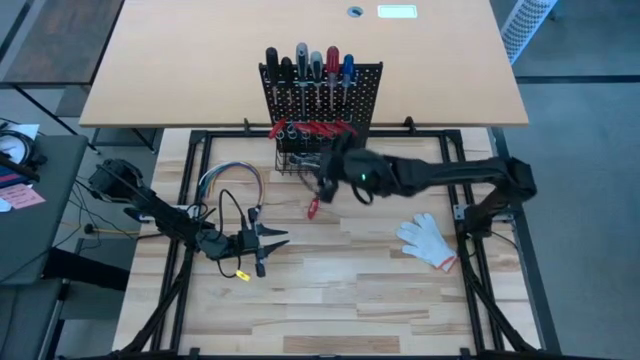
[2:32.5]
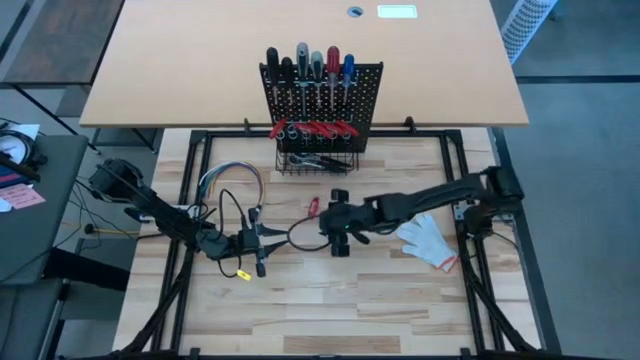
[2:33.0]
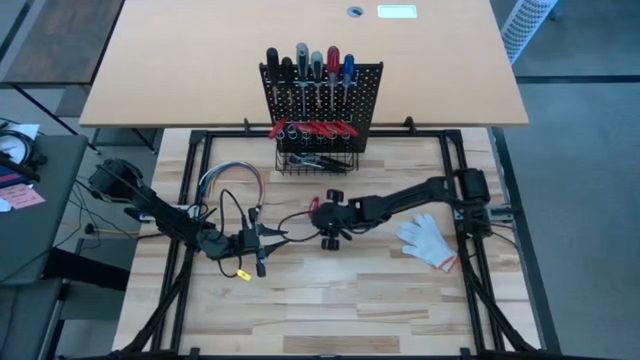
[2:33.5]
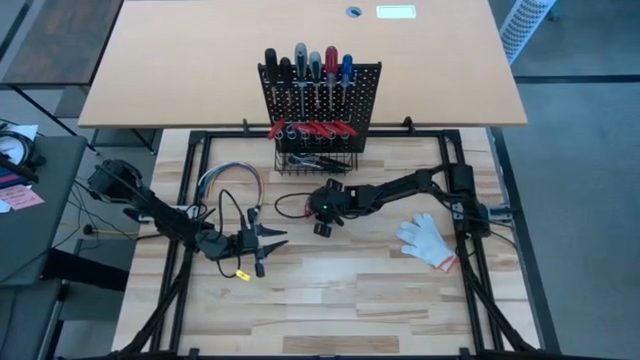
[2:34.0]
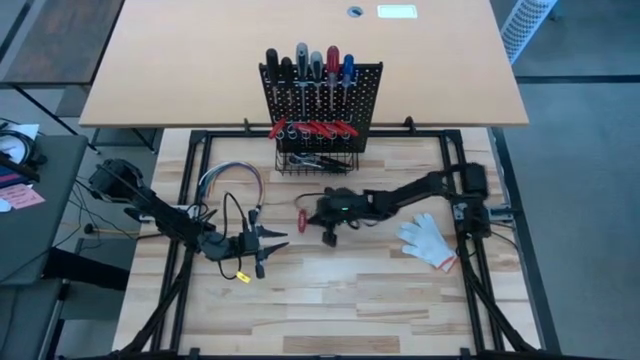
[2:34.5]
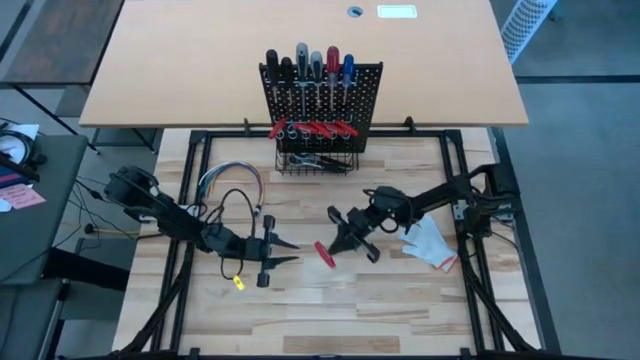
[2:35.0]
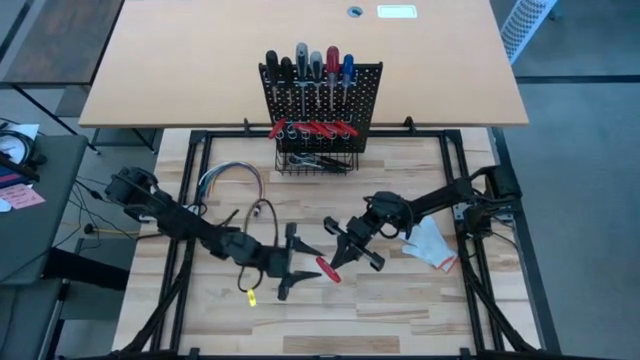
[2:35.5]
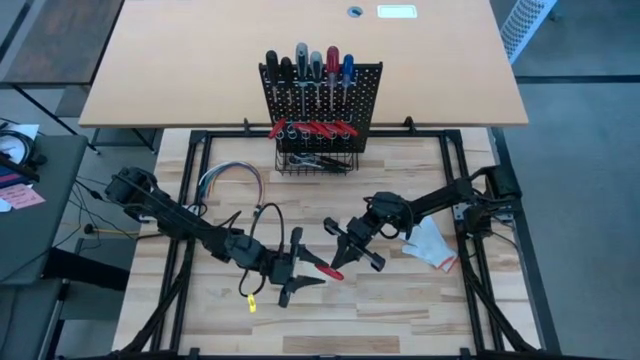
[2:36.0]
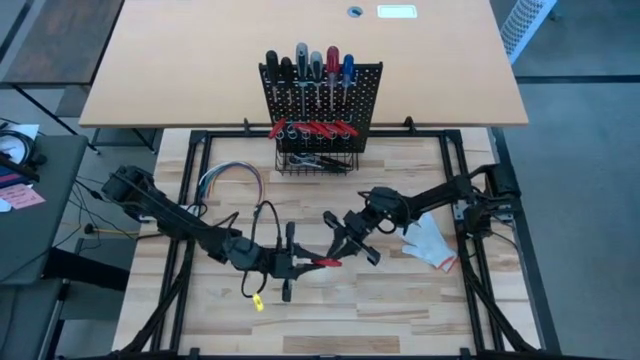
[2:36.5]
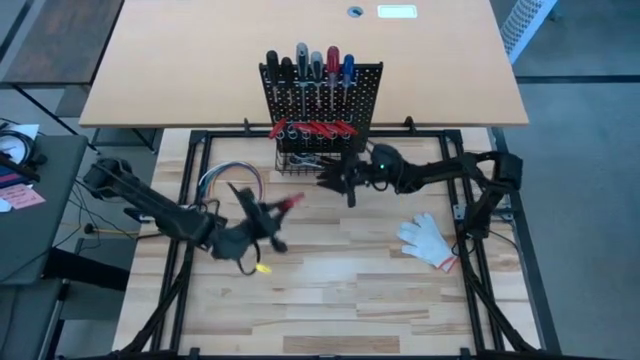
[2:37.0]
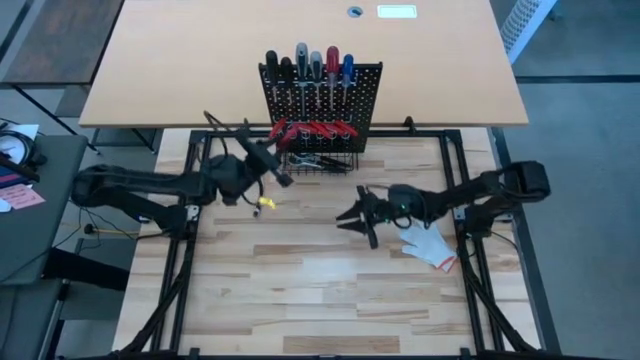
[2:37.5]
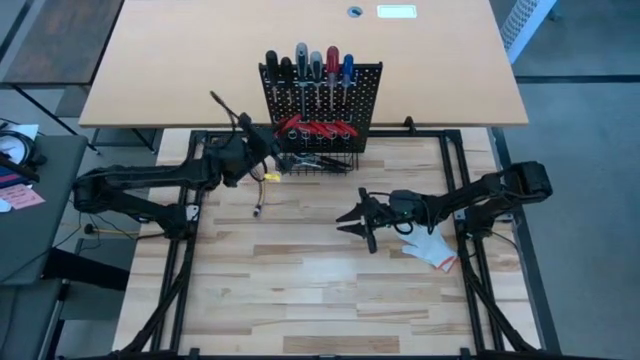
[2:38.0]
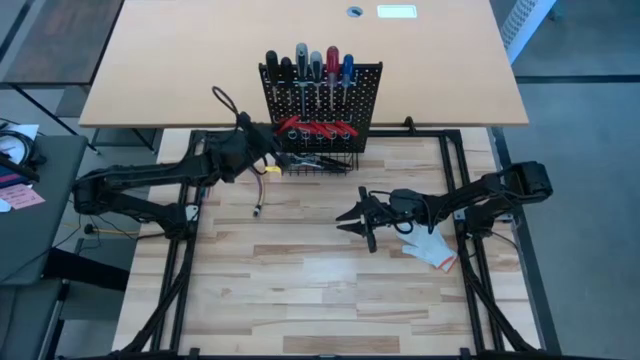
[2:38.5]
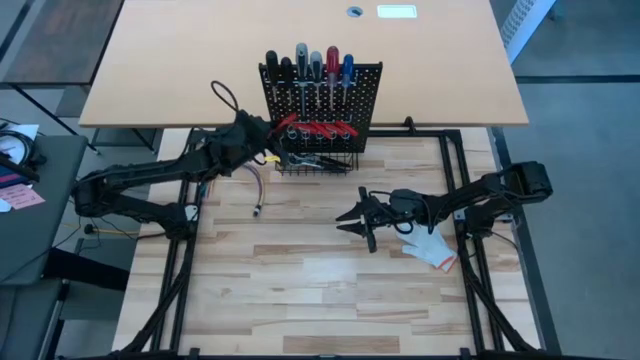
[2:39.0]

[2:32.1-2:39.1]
Task: Hang tools onto peg board
Hang the red allen wrench on the pegboard

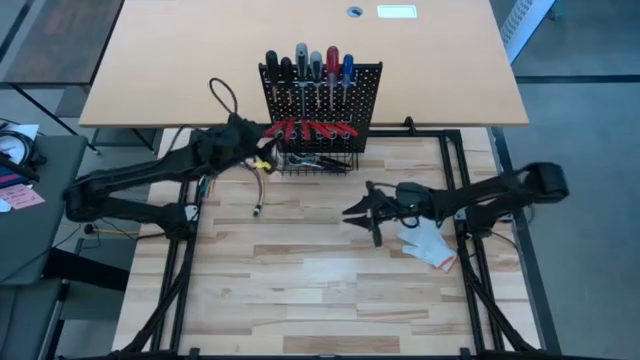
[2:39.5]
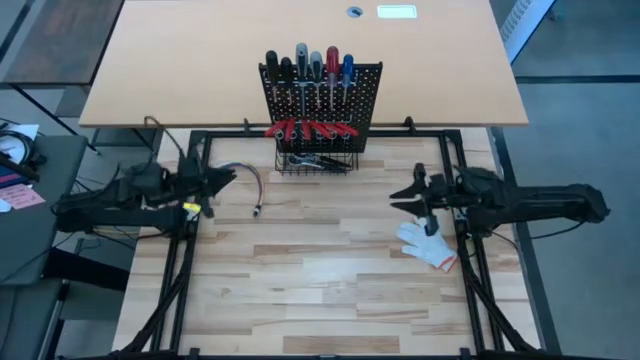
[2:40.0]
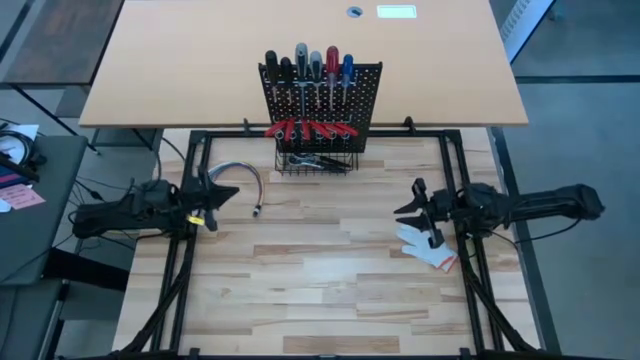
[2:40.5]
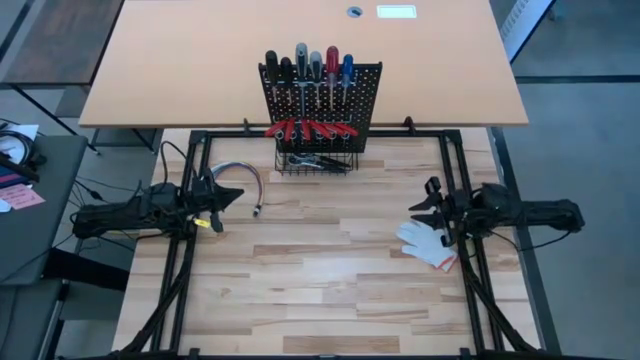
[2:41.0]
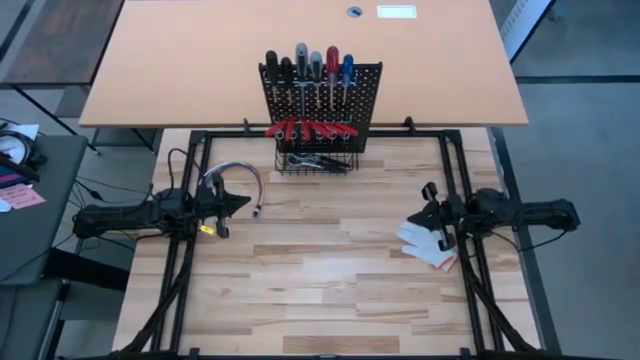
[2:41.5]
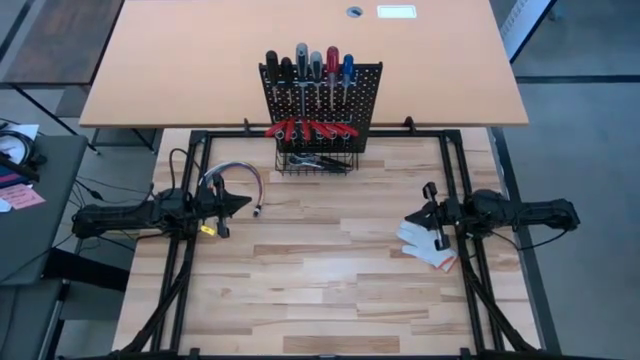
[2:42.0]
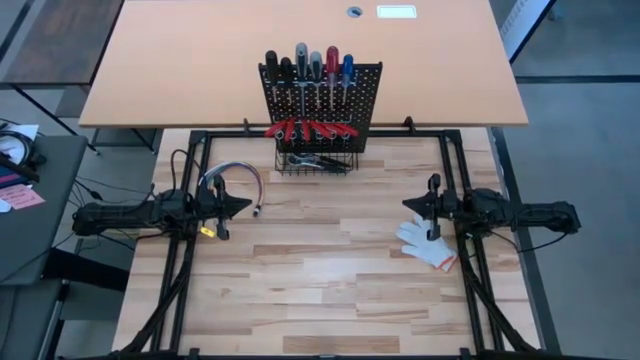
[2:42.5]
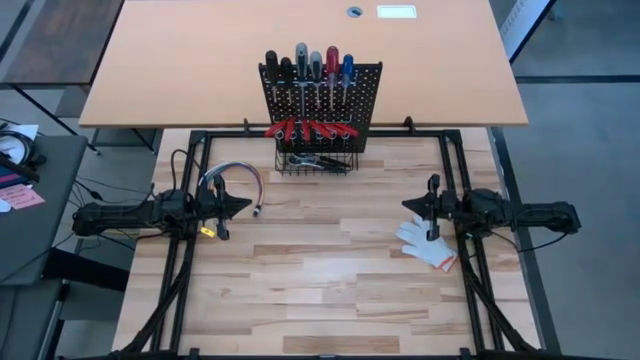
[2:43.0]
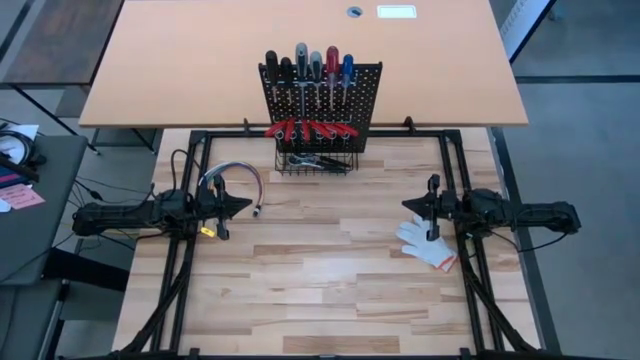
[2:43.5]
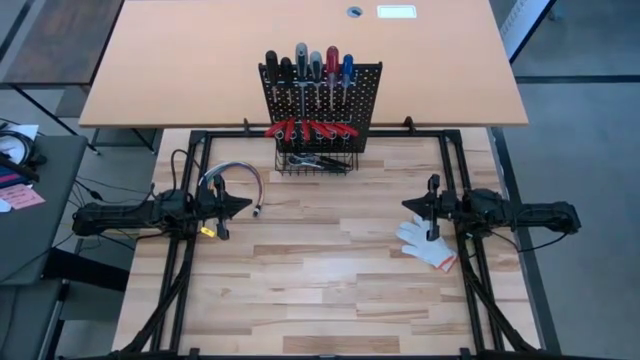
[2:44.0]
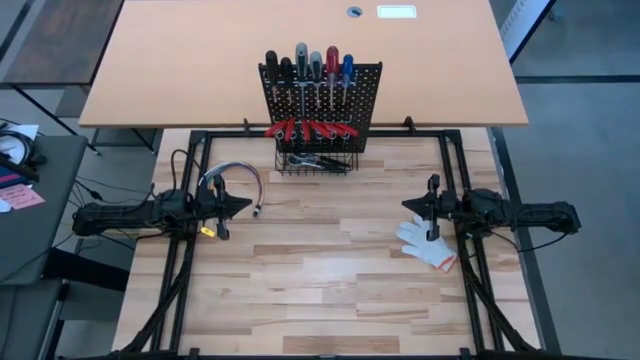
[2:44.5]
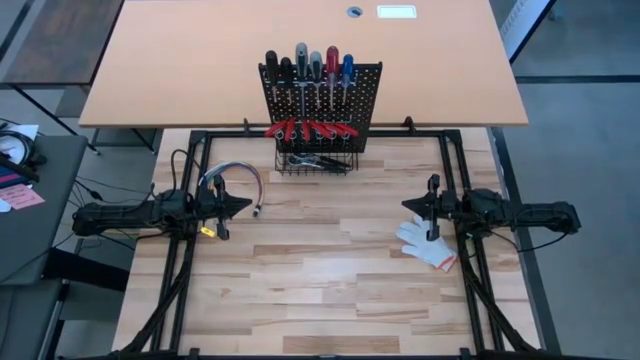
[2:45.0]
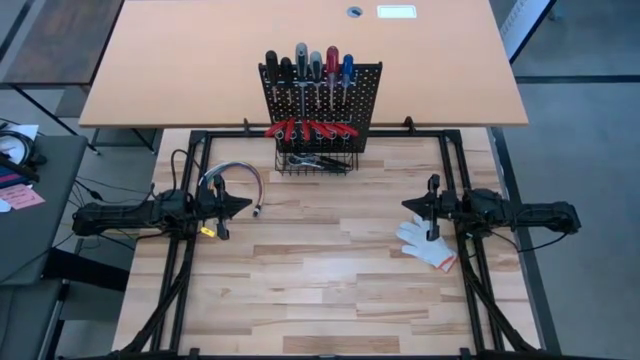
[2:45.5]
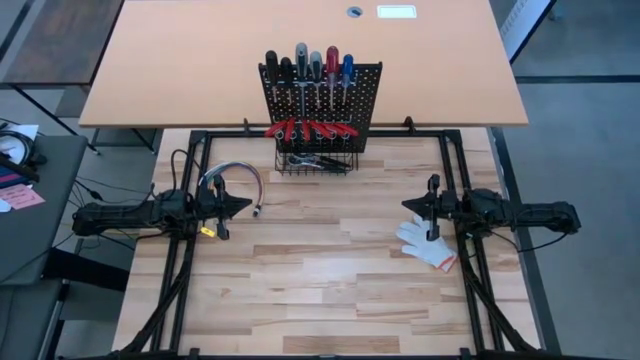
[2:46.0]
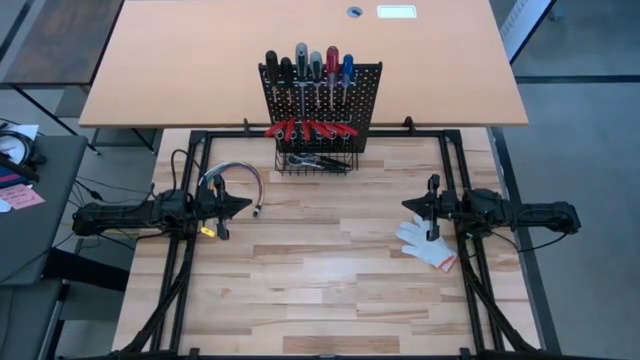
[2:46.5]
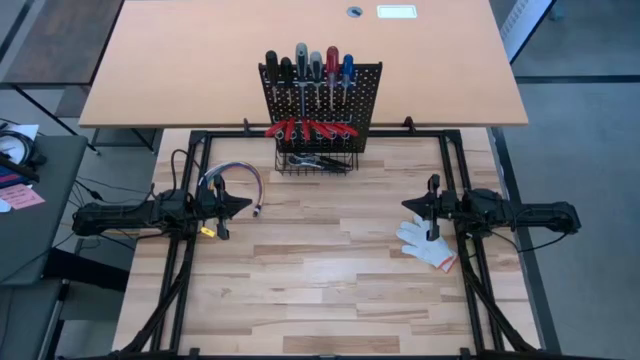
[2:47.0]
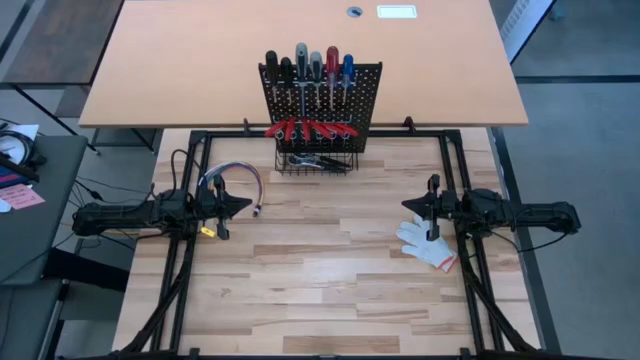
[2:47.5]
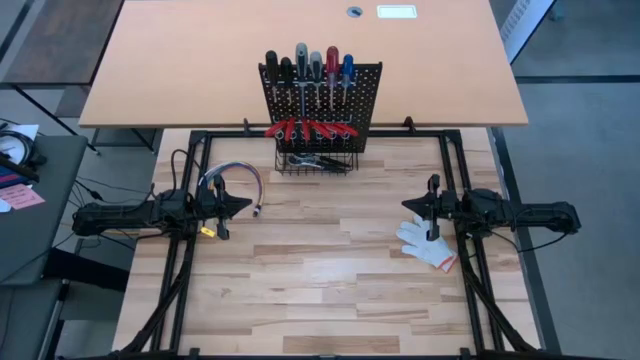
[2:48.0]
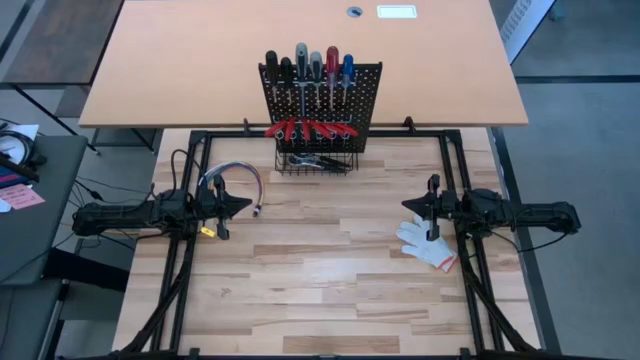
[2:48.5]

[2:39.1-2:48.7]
Return to Home Position

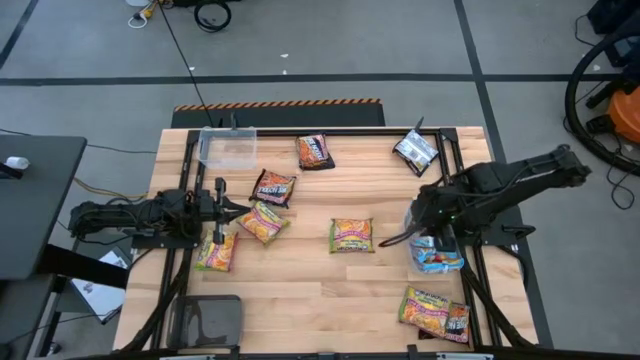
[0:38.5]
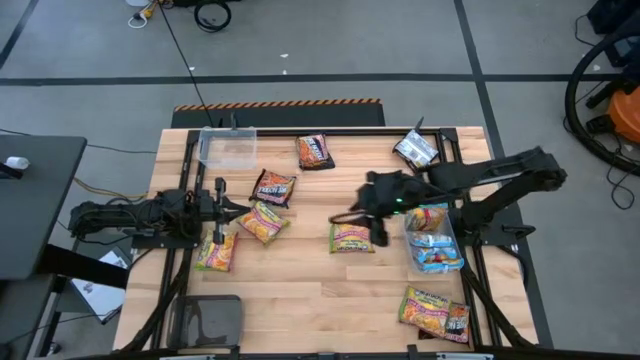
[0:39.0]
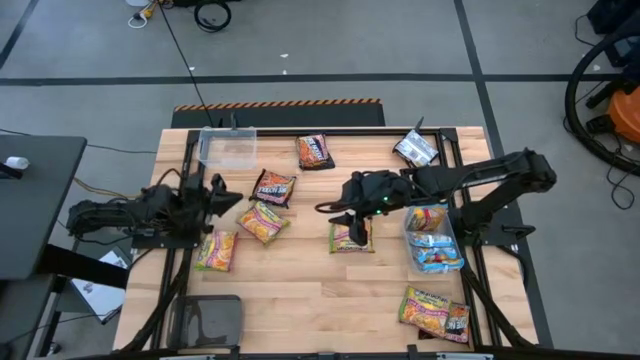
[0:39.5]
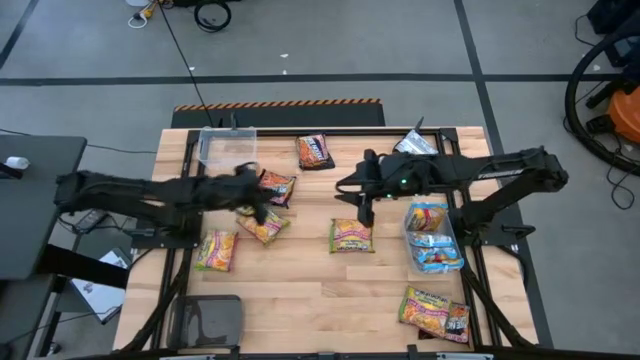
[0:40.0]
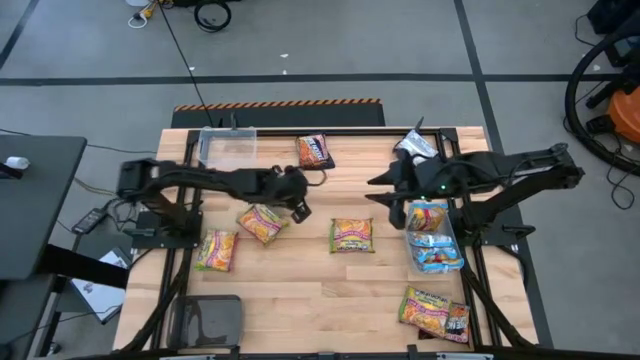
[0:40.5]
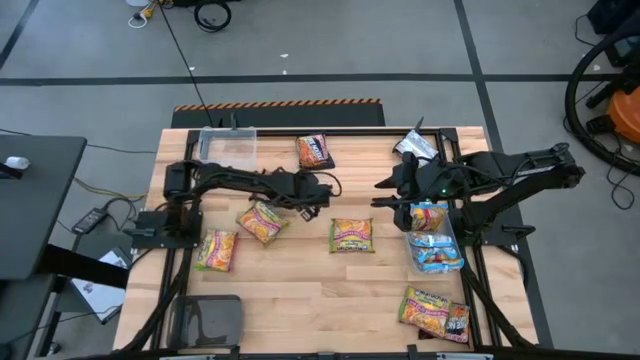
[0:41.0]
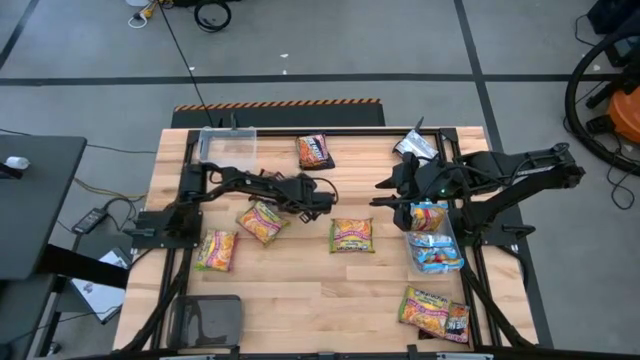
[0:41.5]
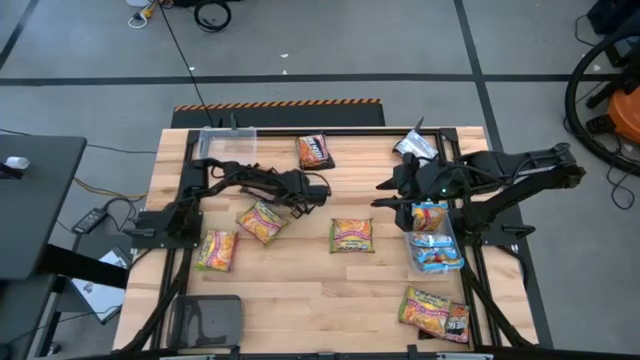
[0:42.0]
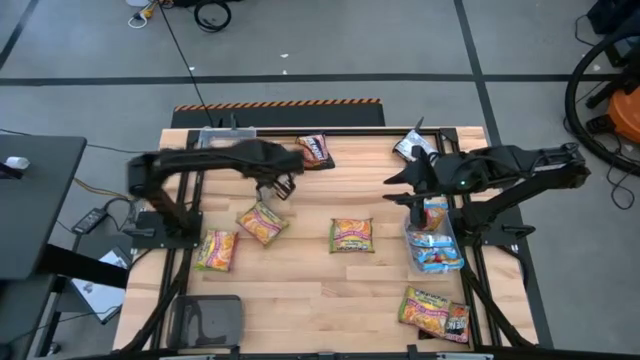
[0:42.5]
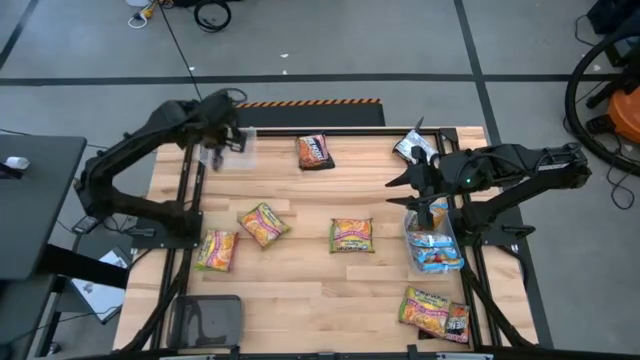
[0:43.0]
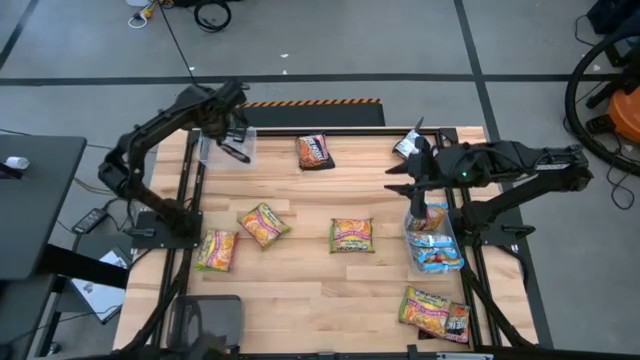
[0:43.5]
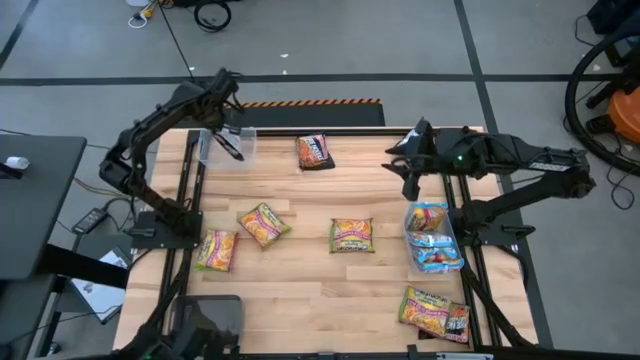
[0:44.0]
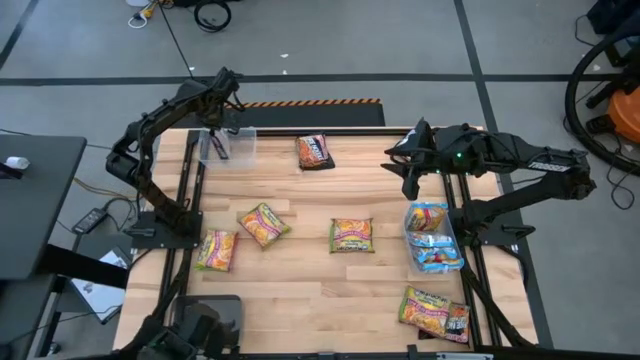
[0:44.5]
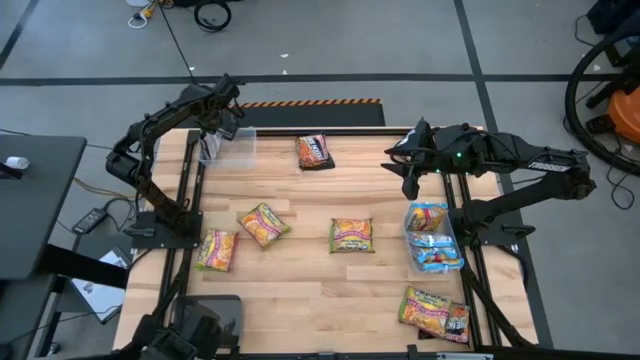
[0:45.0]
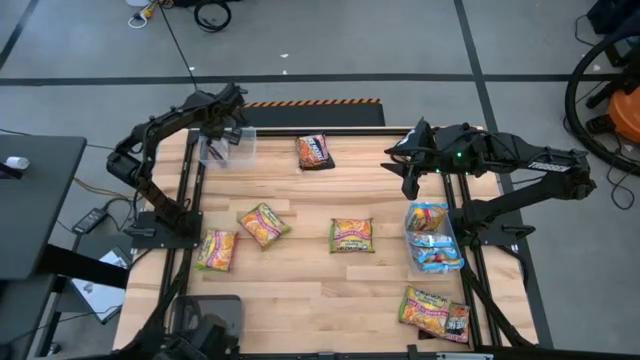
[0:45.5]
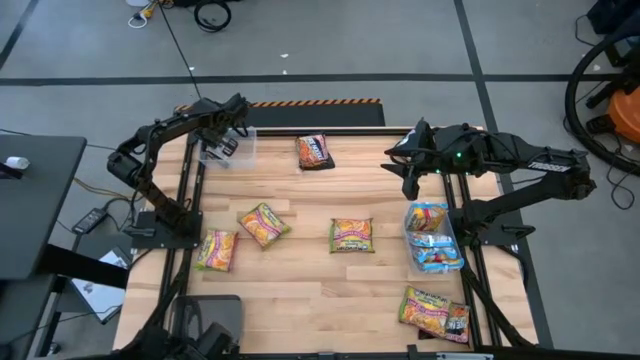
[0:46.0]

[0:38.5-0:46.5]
Task: Sort Maruchan noodles
Put the black noodle pack into the top transparent bin
